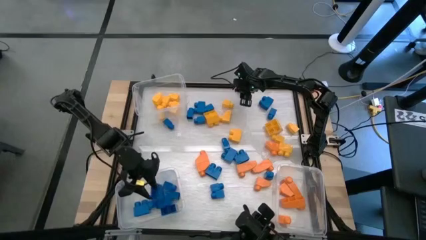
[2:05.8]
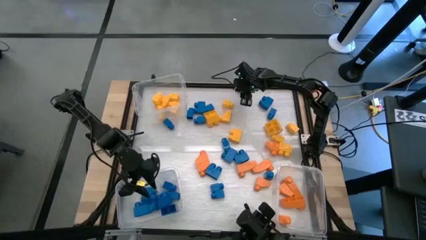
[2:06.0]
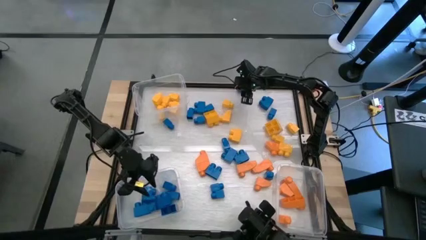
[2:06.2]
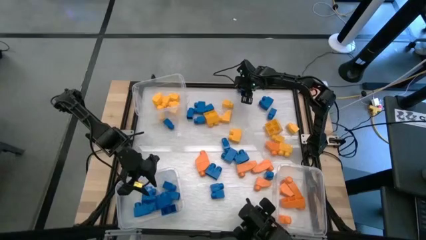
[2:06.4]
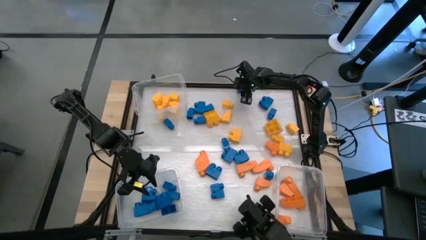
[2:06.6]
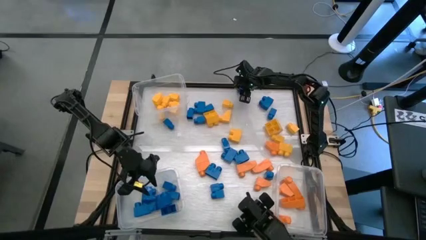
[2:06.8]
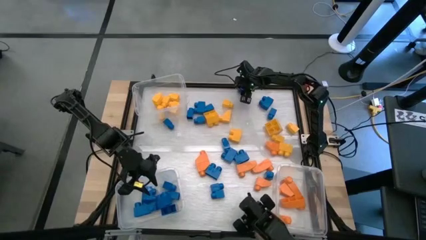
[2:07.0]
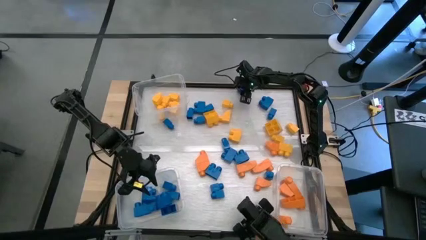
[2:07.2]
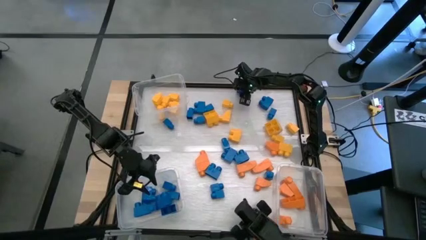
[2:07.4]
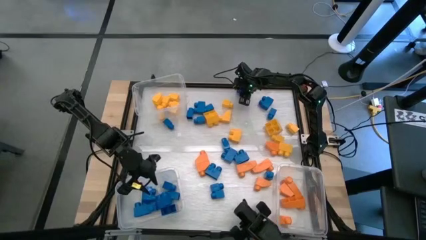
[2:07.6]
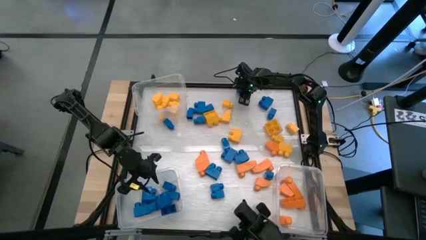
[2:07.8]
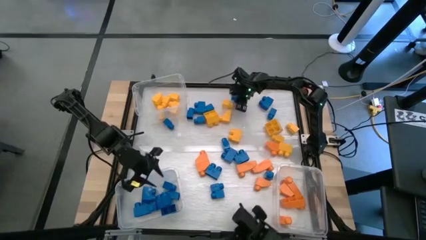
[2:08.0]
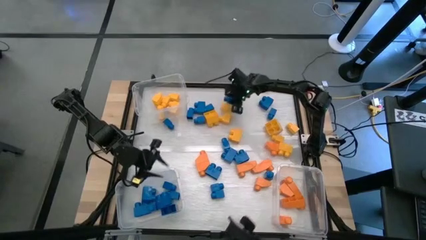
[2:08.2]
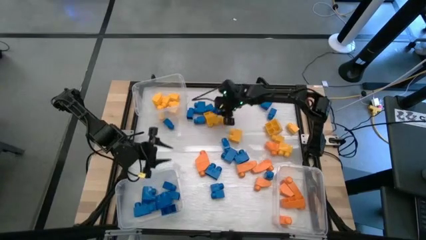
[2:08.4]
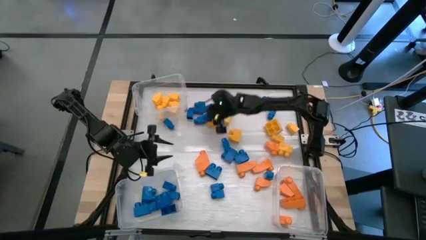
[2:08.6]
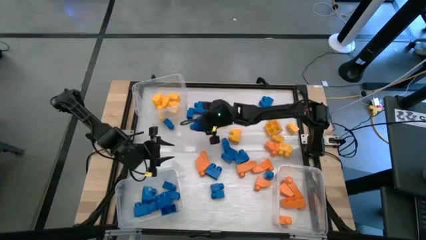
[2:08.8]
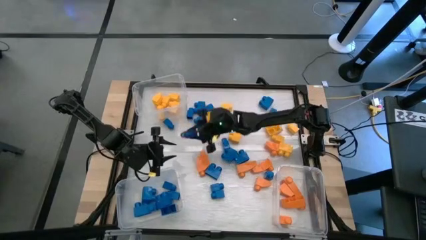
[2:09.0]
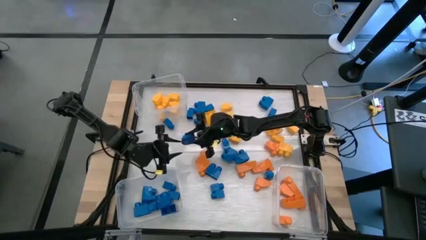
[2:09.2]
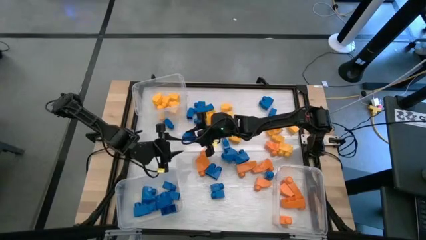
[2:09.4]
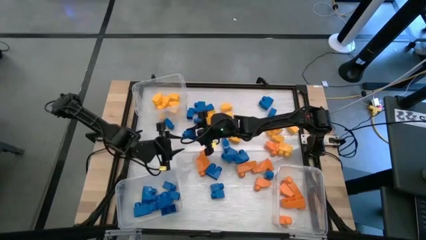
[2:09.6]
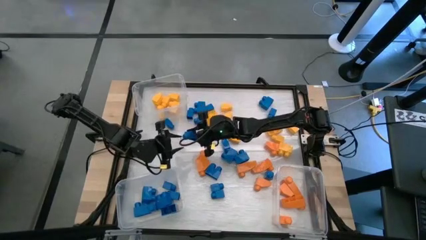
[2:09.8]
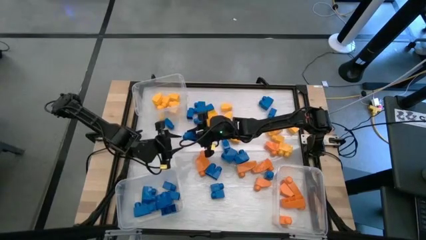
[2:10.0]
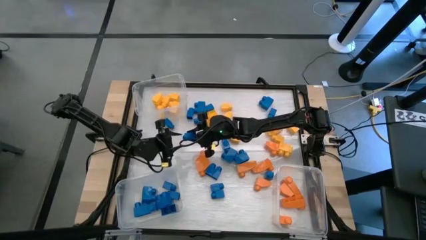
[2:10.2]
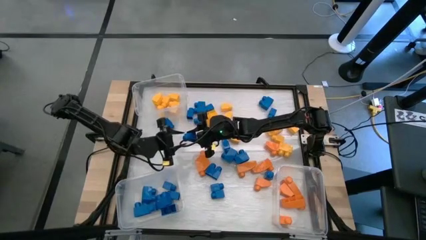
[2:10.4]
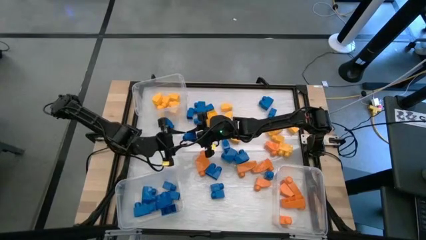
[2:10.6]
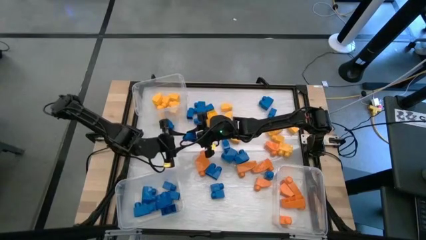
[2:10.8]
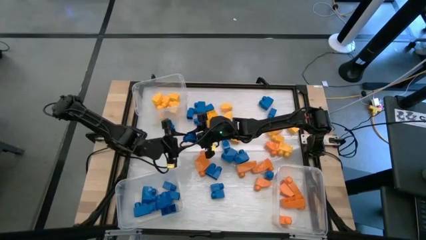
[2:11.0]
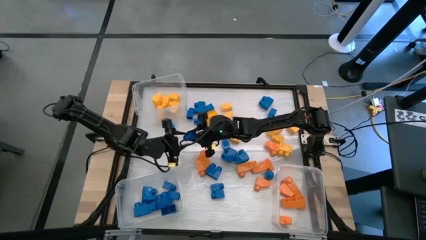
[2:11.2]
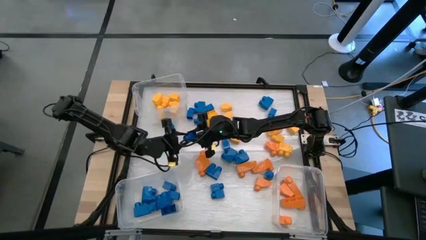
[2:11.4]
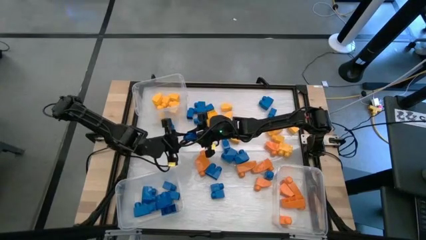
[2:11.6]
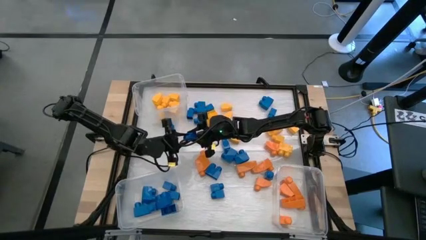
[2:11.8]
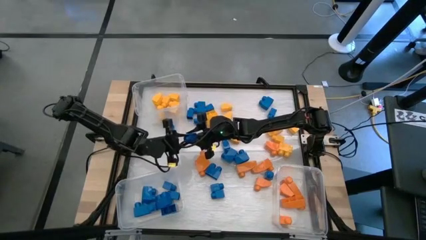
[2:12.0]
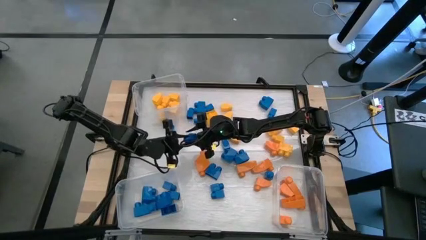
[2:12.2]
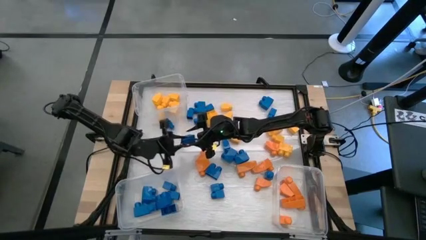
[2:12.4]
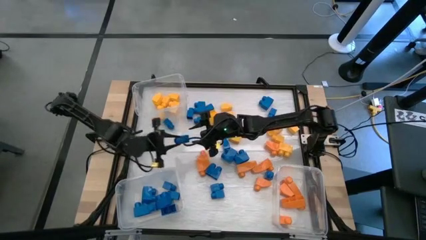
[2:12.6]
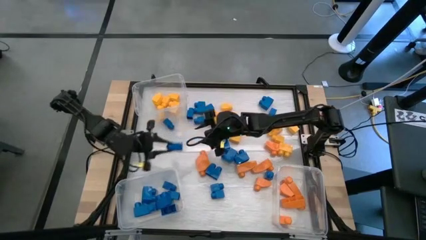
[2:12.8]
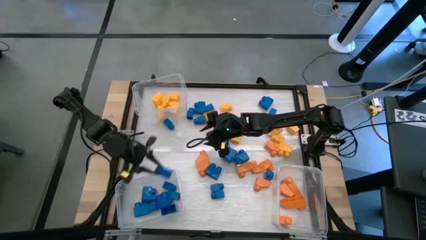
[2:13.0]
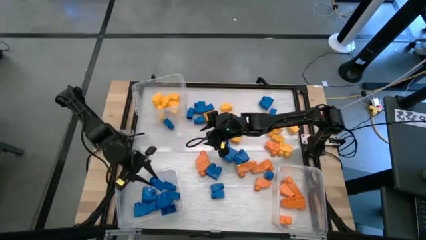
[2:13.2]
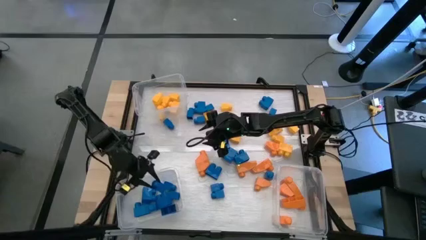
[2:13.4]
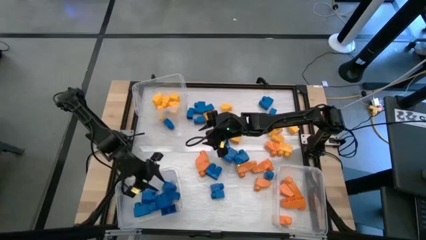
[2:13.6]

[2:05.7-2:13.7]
Task: Sort blocks
Put the blue game piece into the bottom left transparent bin

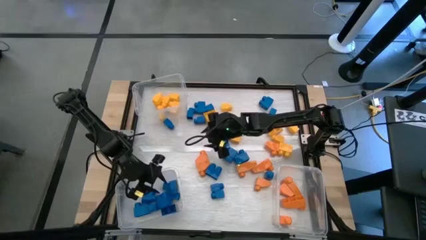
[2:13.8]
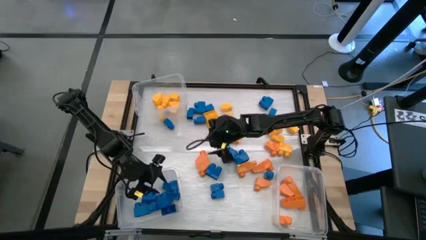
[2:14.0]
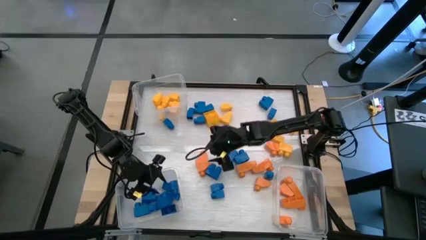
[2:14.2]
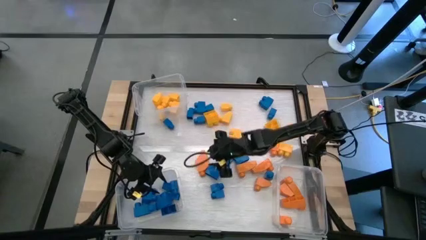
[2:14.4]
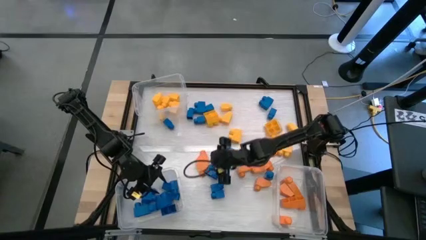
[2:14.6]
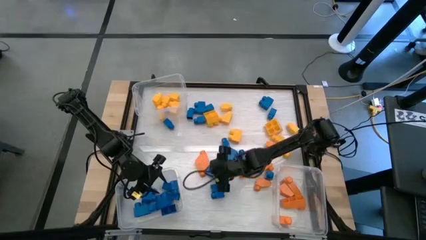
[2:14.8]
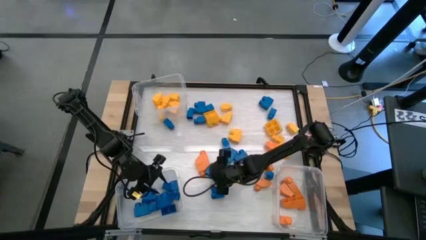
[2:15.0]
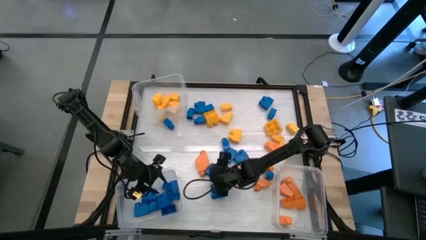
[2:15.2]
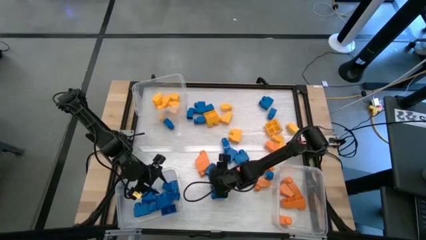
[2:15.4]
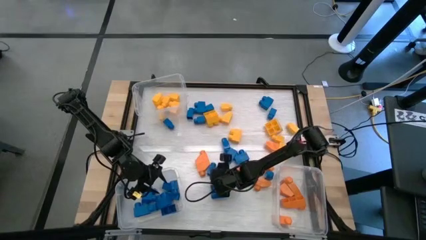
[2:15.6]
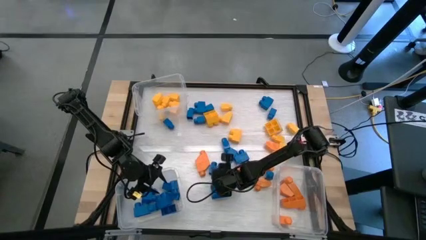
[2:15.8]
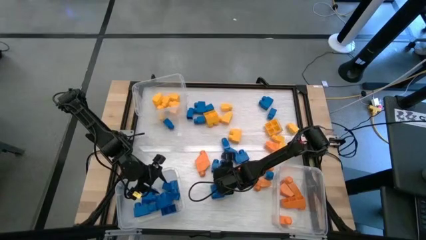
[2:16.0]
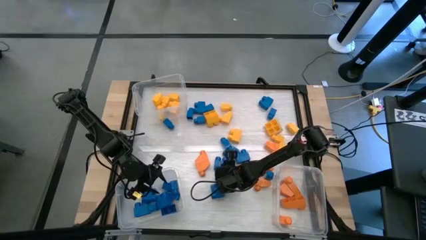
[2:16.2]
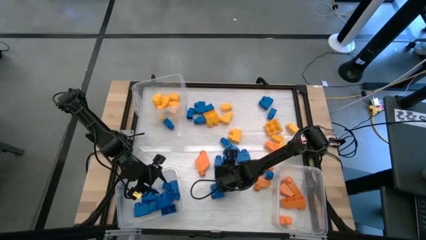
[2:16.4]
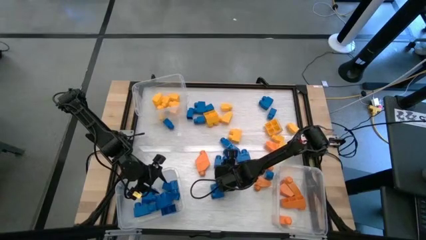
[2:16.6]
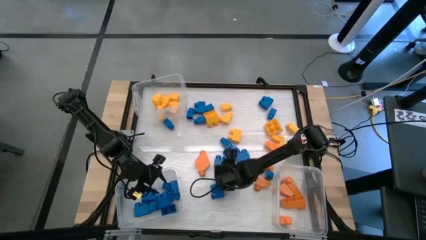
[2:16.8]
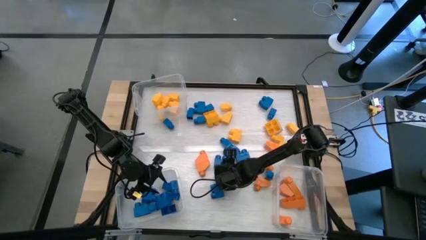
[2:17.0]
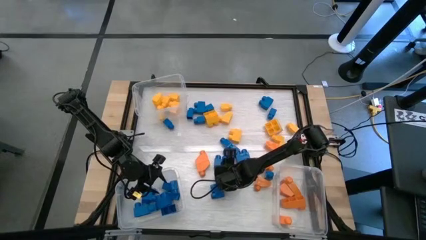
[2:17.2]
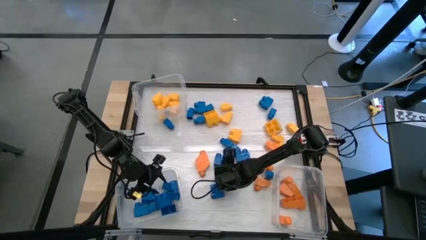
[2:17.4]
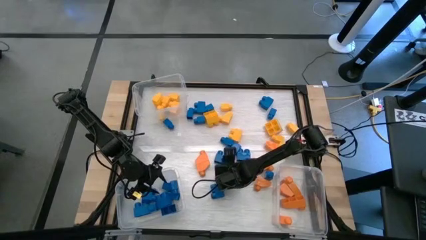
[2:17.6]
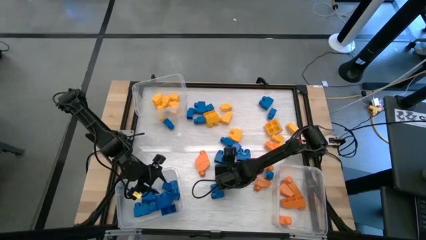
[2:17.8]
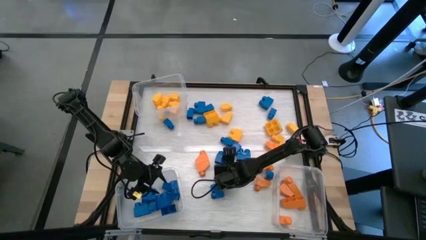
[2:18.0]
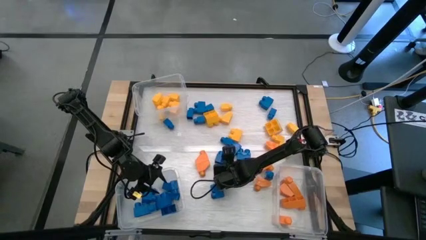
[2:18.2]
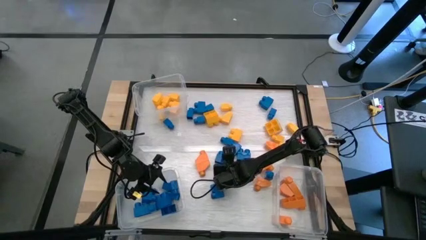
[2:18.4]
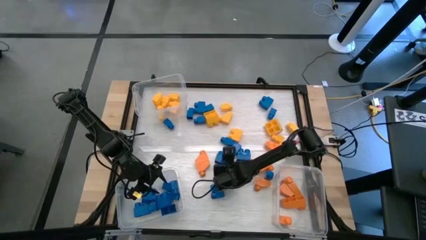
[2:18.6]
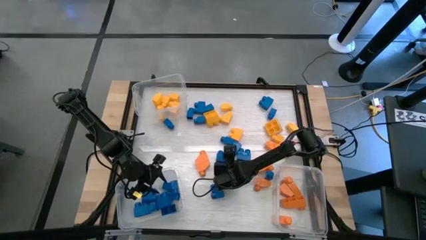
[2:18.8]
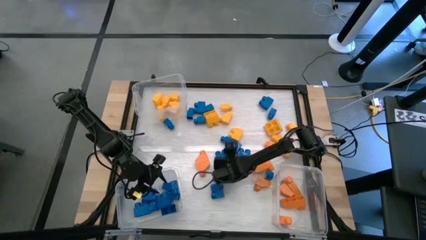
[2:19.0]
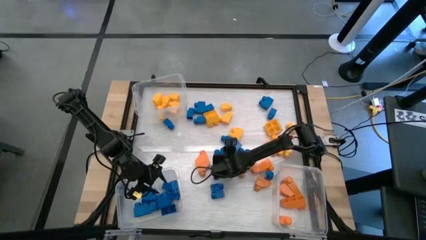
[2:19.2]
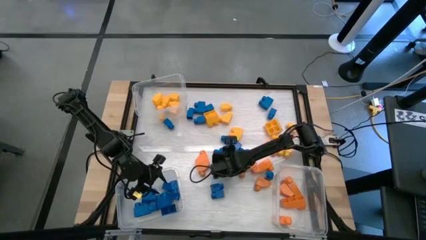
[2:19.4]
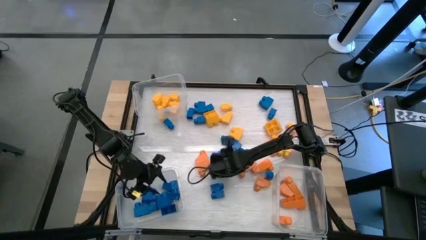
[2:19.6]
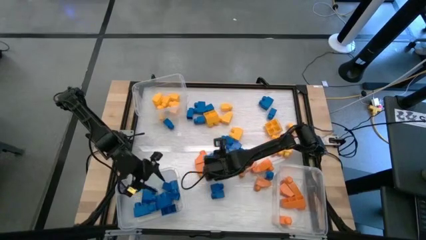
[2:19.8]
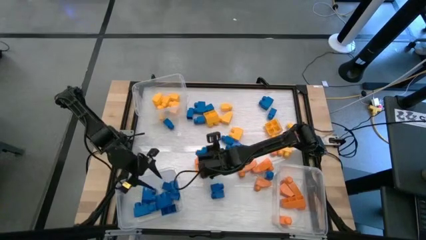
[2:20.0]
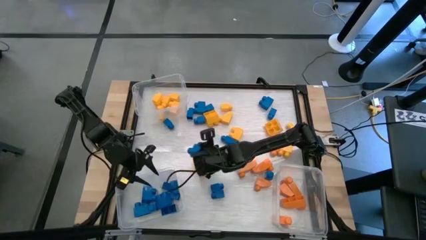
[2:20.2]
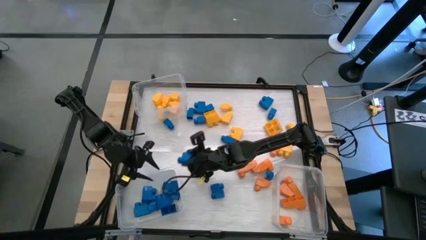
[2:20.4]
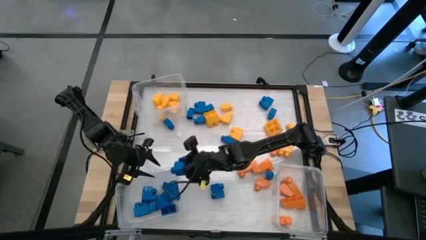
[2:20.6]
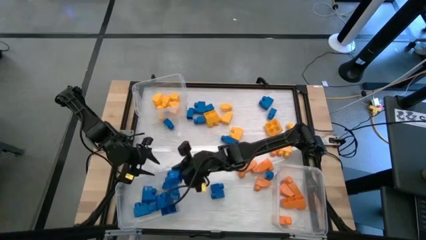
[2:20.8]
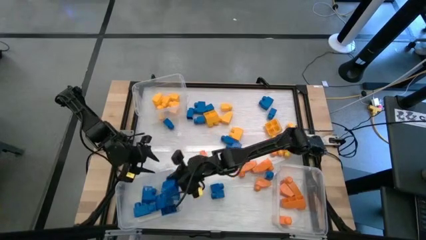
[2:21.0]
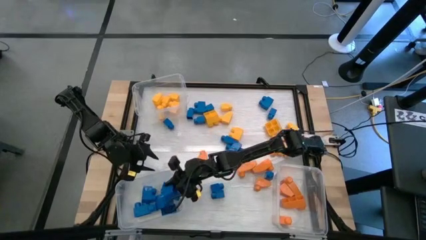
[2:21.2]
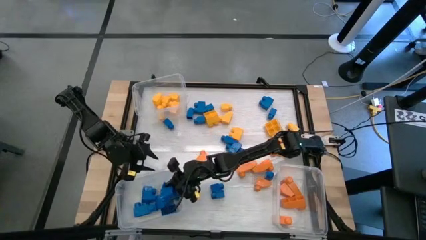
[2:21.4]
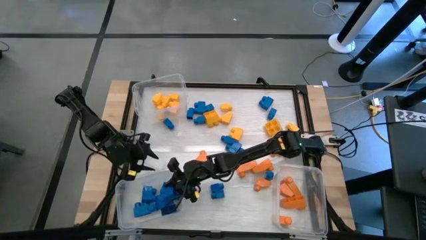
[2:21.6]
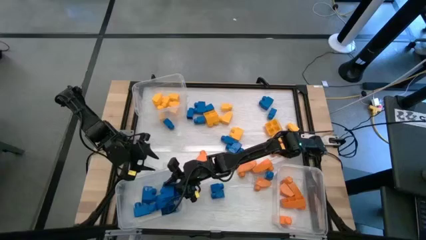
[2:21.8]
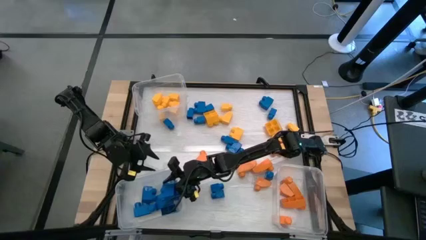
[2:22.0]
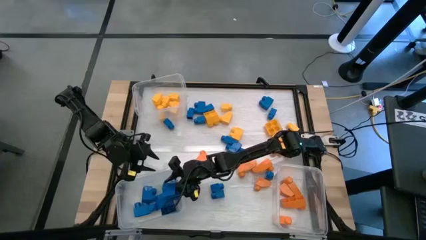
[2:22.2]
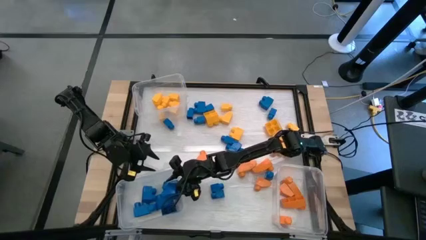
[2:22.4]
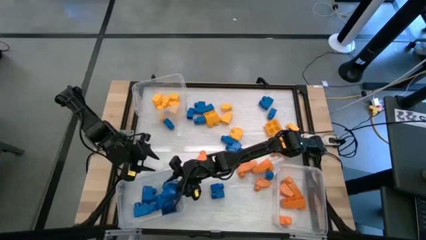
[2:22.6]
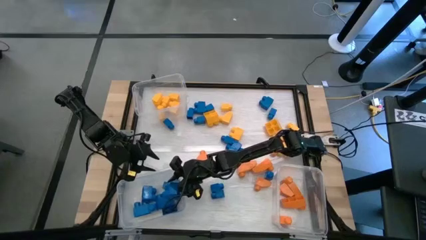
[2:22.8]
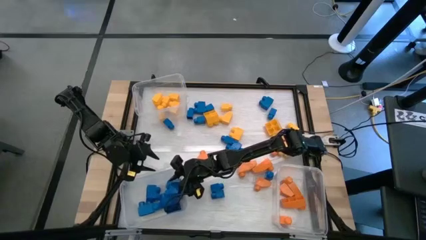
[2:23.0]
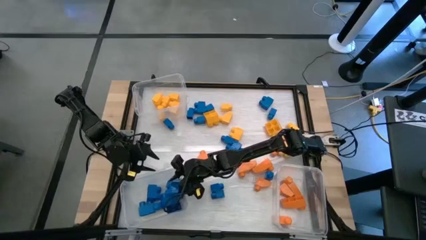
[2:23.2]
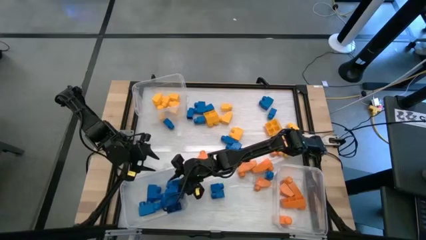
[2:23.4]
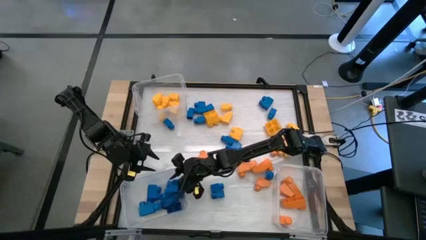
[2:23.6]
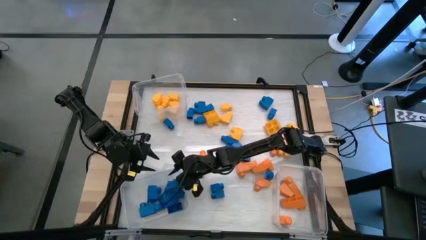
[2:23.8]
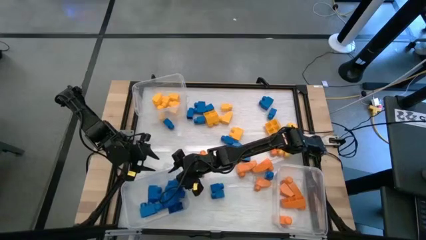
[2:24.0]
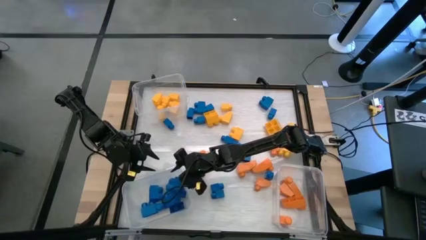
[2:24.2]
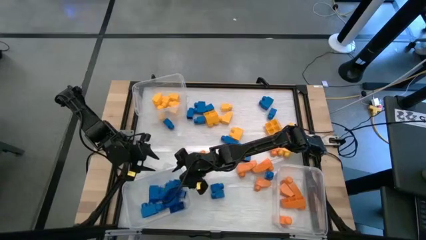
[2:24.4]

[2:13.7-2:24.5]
Put the blue game piece into the bottom left transparent bin
